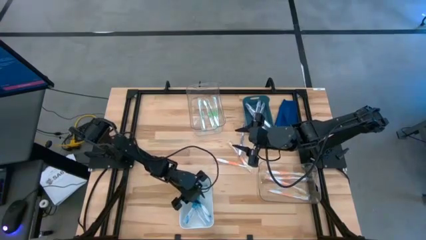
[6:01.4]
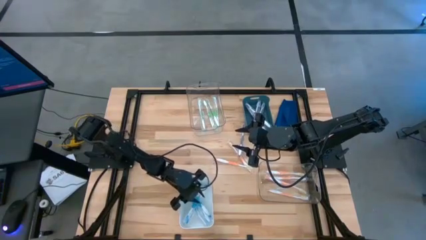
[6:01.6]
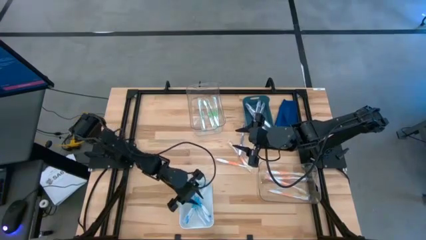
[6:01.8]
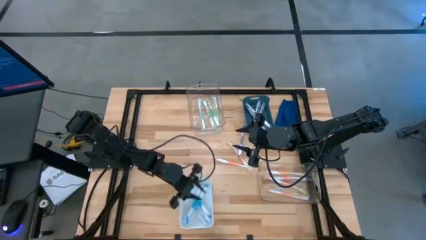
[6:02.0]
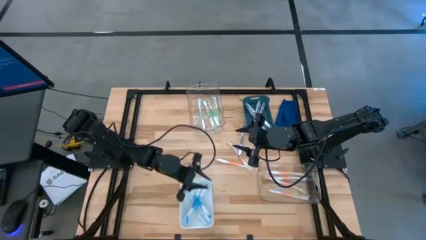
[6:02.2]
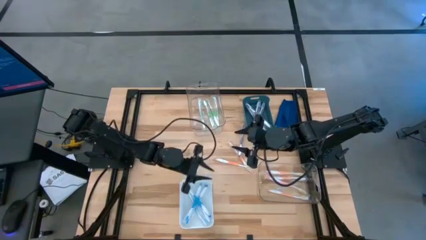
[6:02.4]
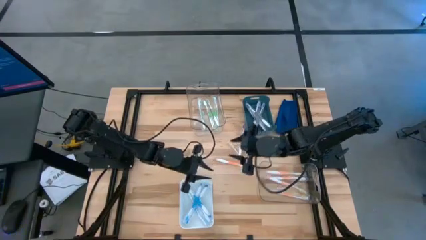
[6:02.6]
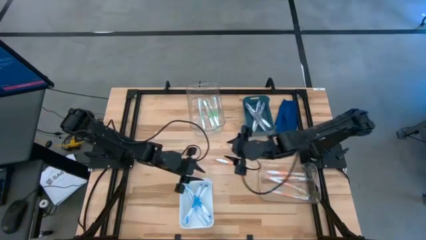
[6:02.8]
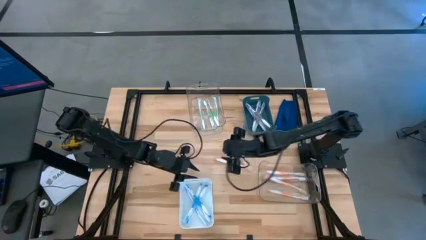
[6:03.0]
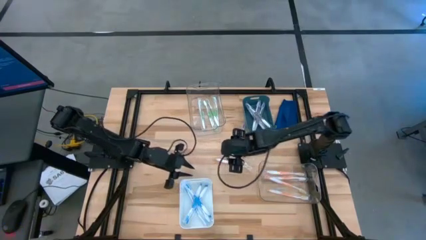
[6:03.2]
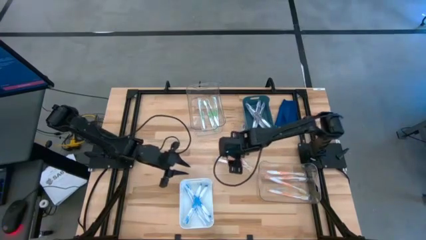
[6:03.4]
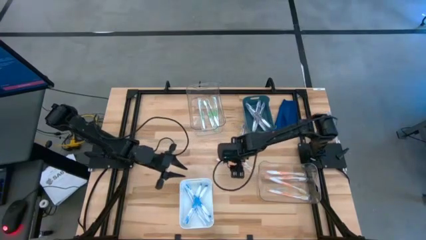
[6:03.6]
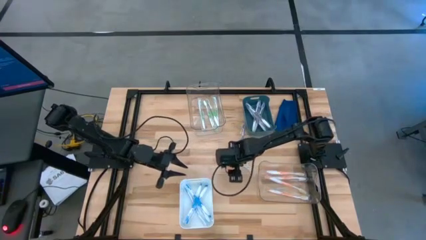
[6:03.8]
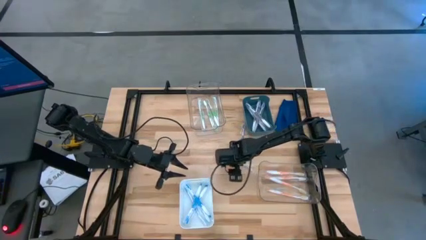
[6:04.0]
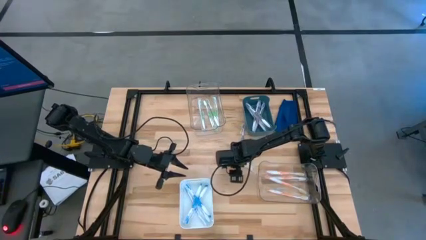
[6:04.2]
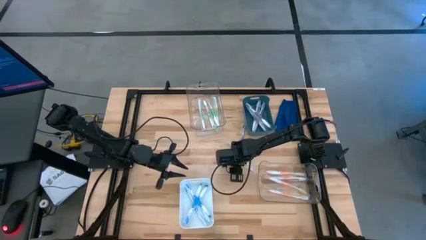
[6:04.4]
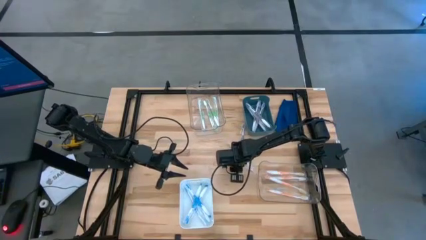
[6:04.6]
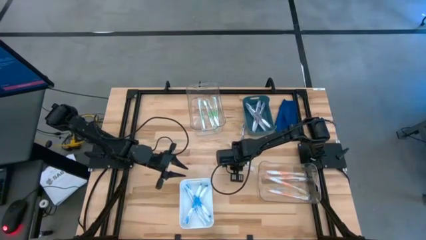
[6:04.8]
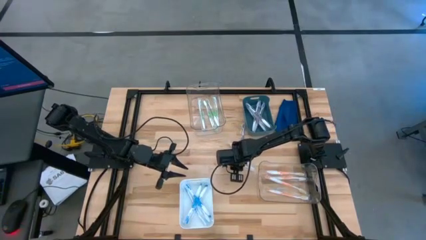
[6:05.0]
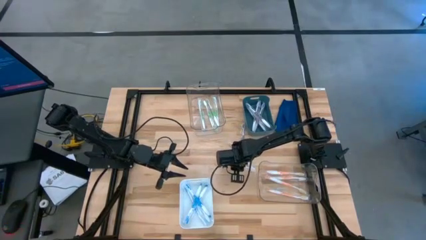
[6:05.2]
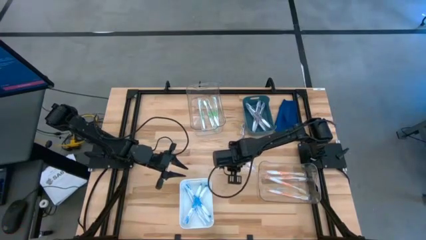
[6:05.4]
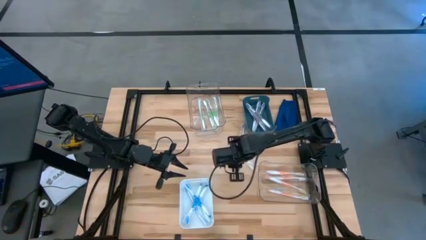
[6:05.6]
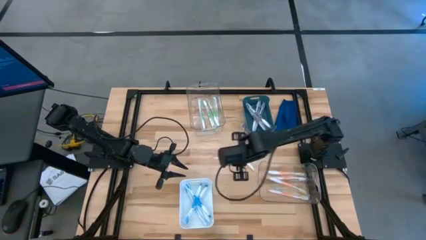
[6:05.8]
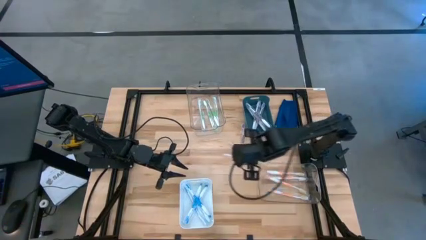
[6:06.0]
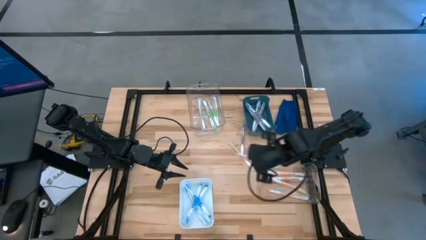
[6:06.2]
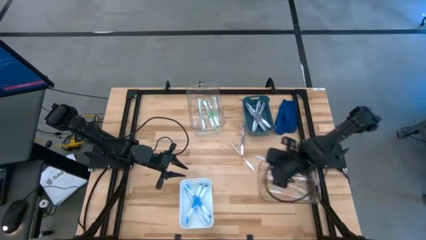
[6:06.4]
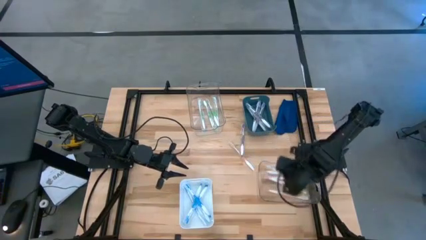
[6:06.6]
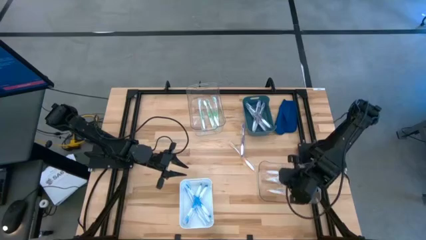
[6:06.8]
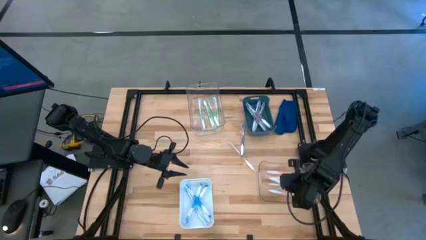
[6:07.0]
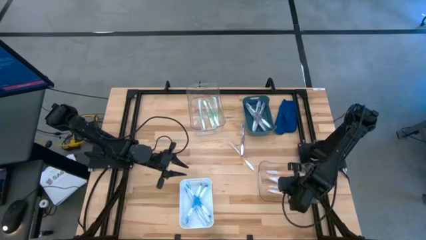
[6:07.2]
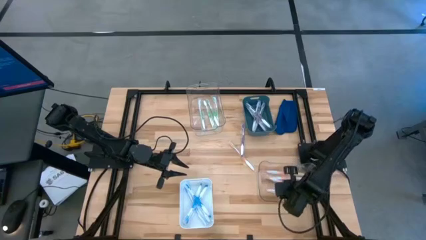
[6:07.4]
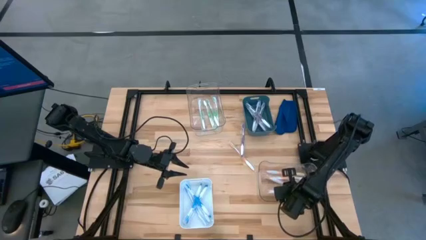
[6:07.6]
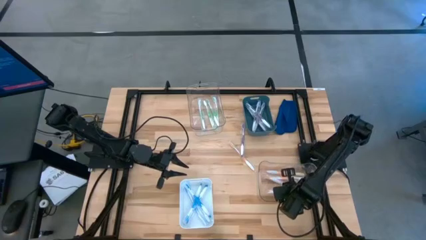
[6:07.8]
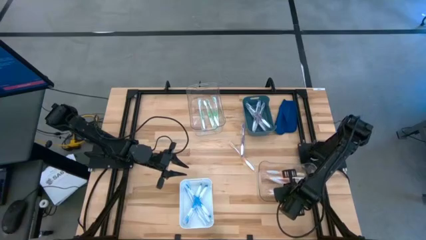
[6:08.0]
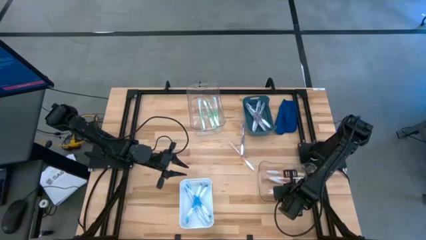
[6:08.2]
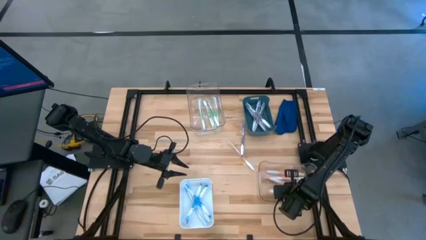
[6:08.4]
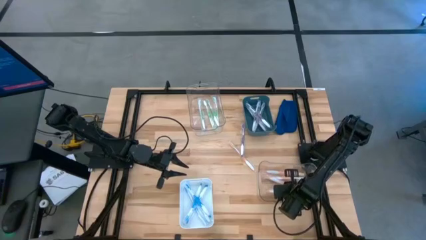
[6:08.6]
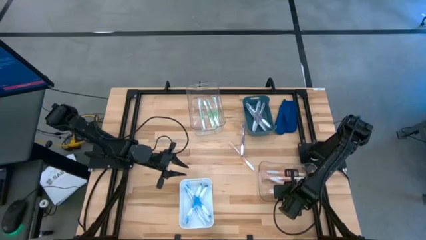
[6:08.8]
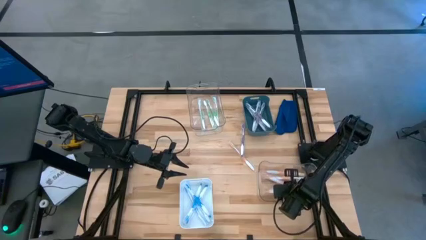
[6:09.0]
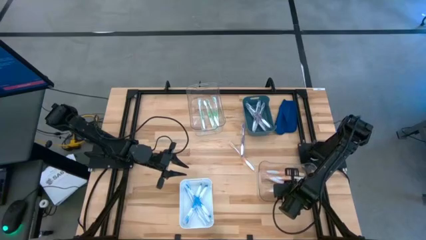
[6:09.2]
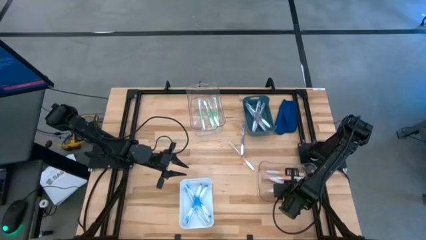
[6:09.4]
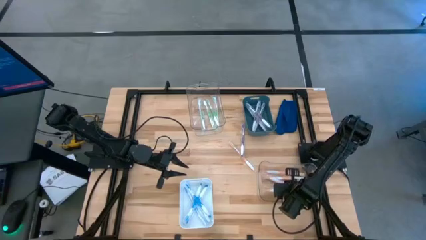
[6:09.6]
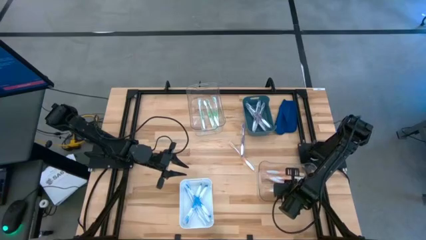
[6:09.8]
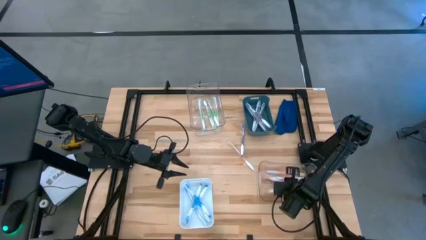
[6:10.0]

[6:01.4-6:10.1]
Task: Pick & Place Toothbrushes
Put the orange toothbrush into the bottom transparent bin

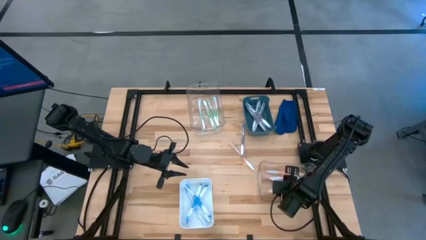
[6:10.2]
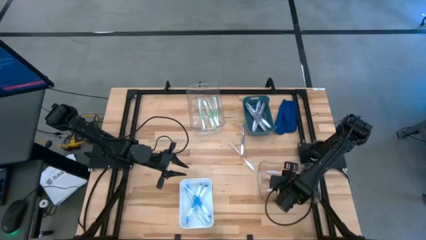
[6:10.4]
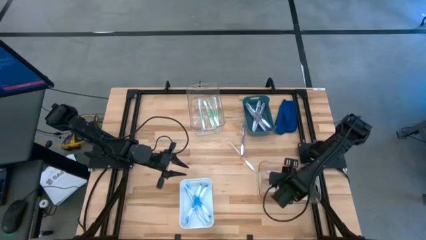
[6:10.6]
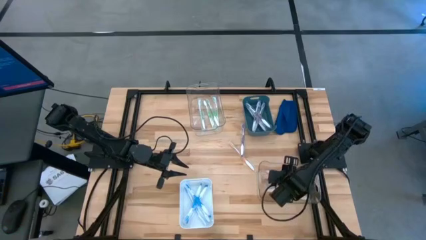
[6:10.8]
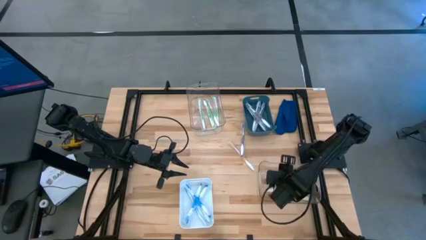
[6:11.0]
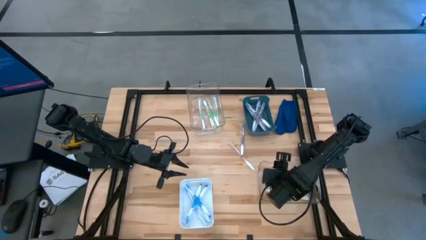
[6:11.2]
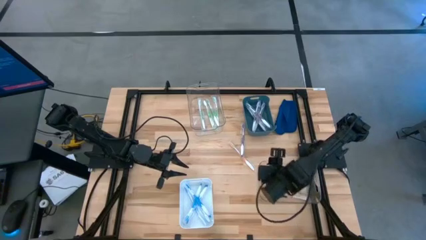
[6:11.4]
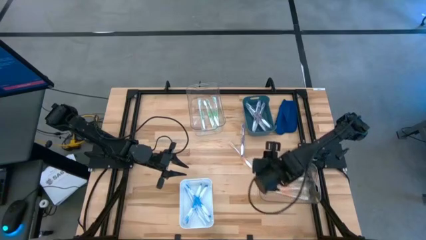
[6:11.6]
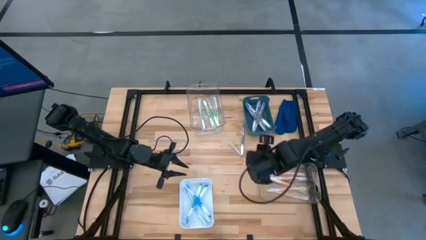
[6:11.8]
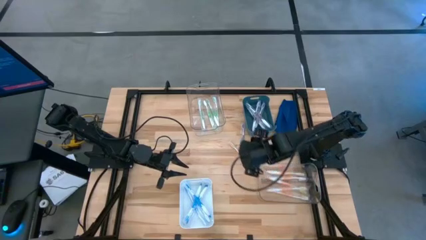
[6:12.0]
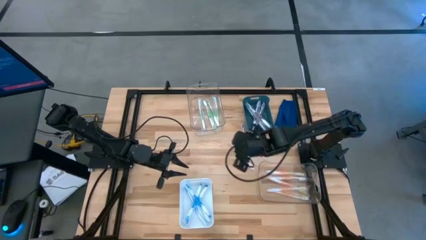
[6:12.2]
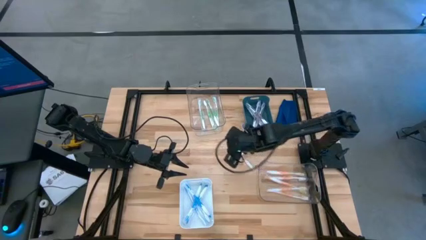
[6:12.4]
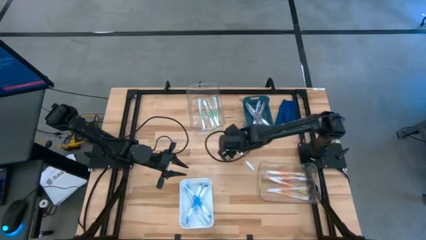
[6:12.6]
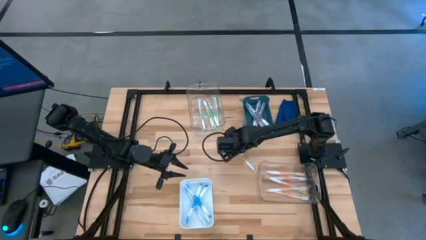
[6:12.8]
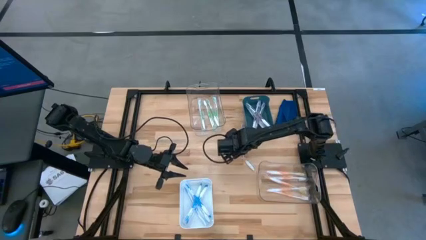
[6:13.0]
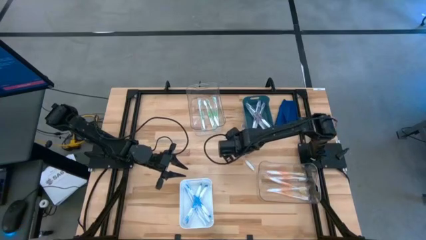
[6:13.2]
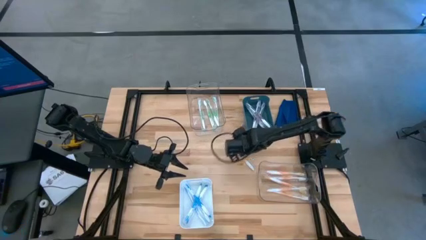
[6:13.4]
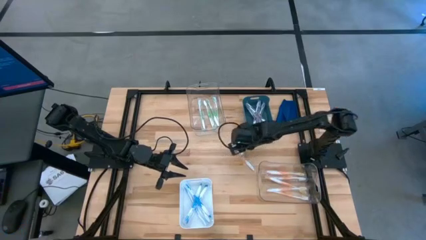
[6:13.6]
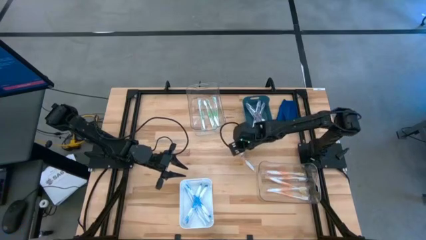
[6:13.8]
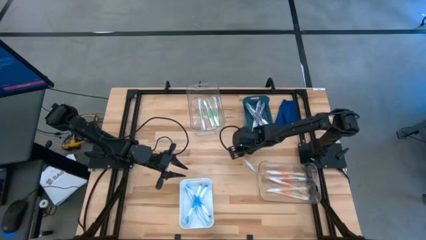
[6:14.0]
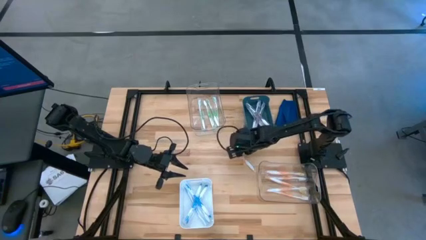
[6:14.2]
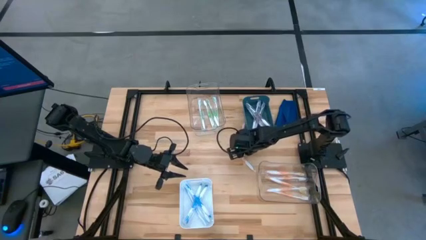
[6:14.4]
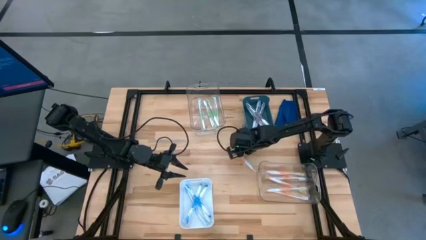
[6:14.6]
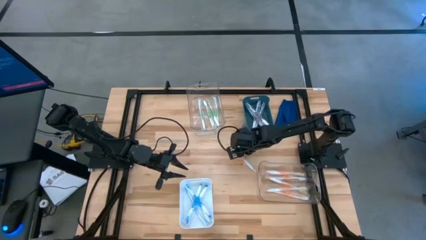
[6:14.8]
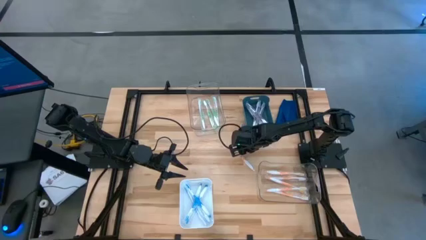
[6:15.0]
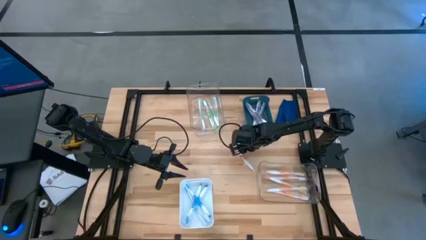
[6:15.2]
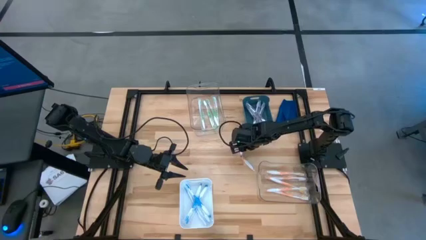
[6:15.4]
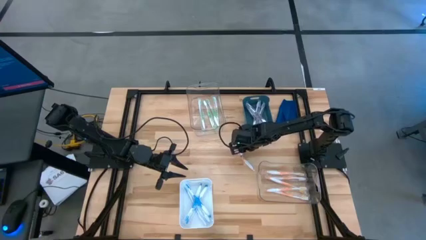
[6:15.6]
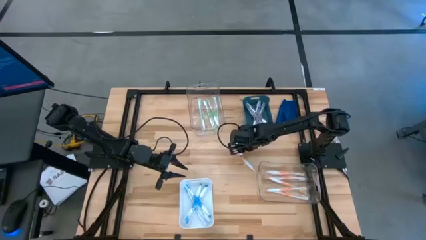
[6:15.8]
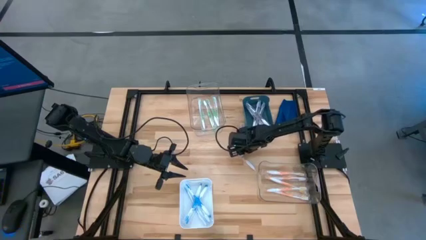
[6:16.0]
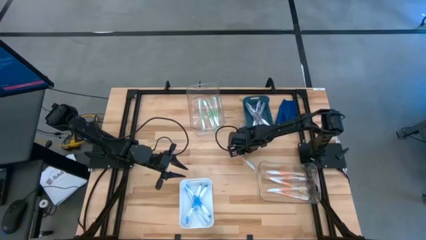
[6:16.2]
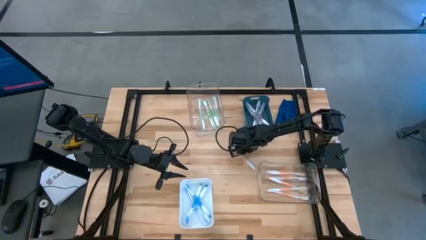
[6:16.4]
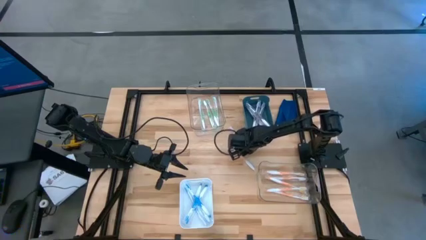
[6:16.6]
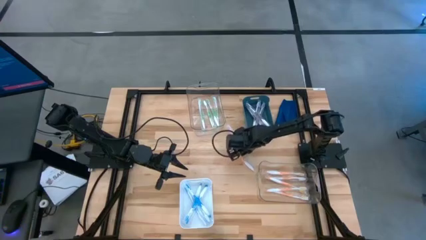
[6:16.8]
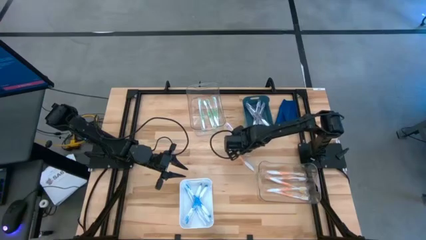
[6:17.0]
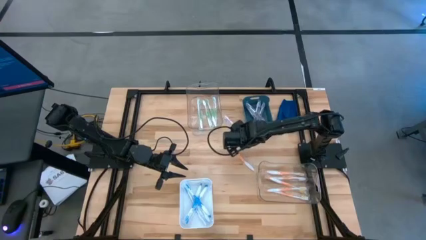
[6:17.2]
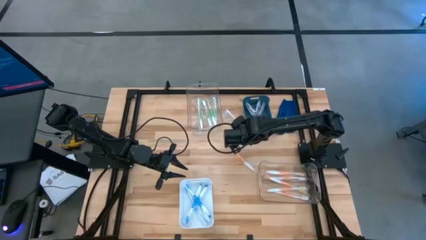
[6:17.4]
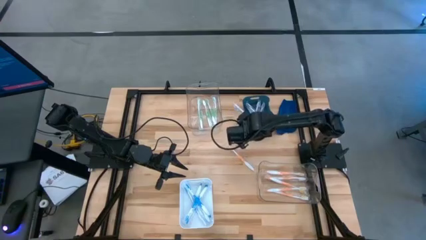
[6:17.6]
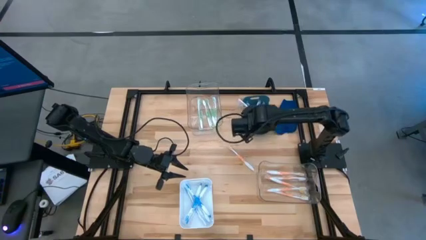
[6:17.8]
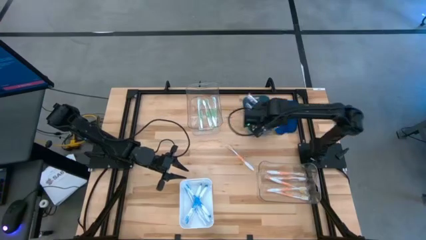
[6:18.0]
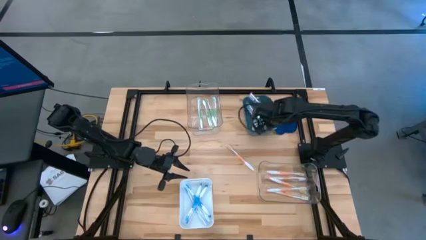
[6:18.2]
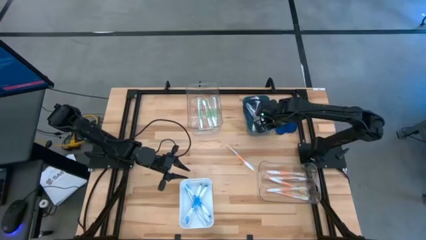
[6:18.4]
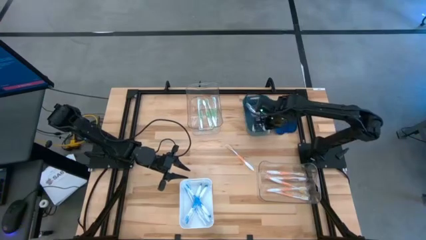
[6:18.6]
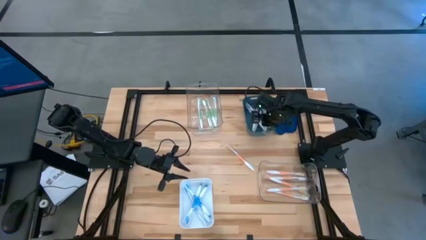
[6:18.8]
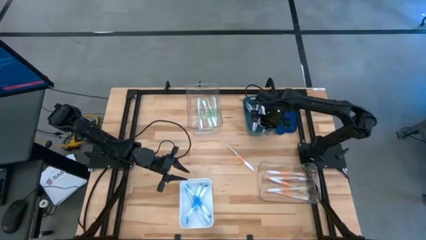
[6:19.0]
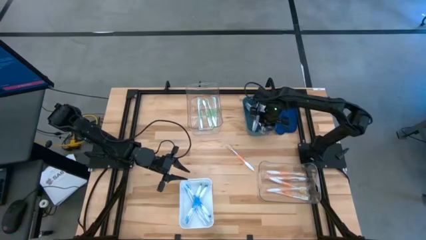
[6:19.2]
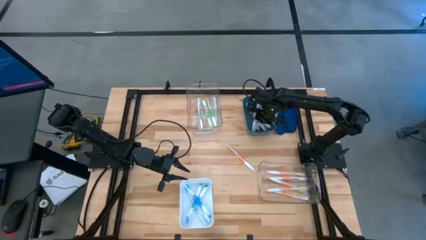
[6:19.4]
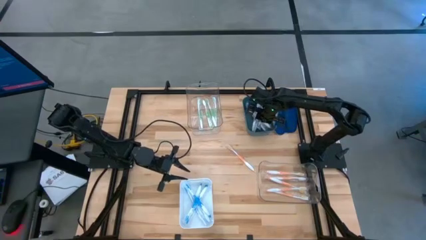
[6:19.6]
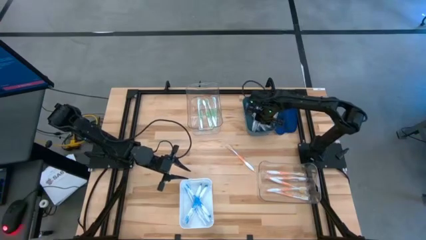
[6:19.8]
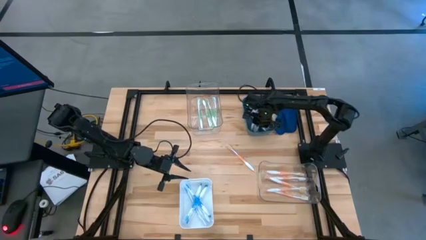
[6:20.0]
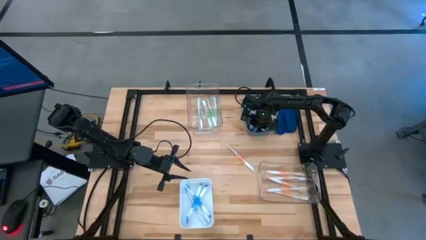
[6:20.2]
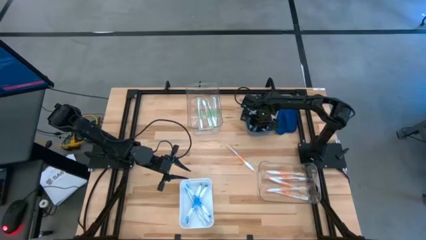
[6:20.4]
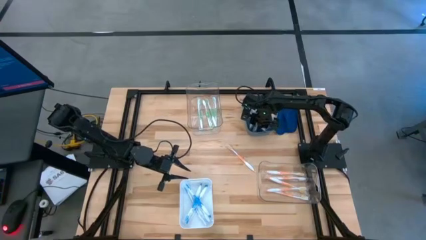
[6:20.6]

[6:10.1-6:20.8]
Put the purple toothbrush into the green bin
